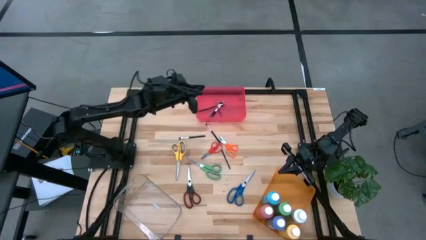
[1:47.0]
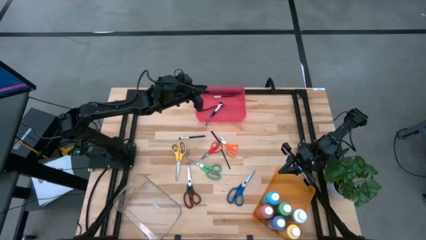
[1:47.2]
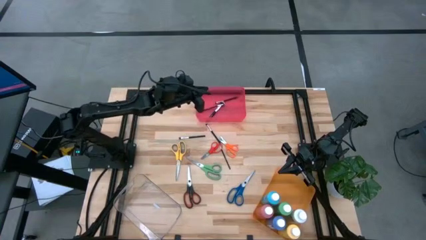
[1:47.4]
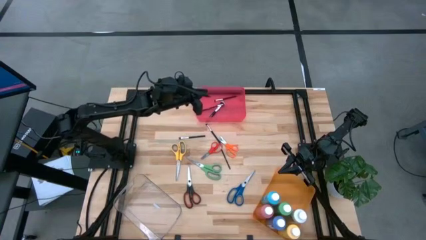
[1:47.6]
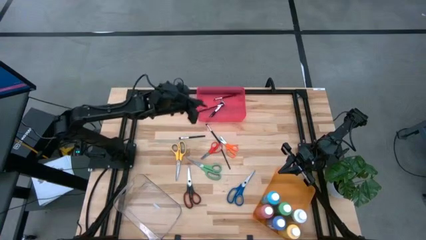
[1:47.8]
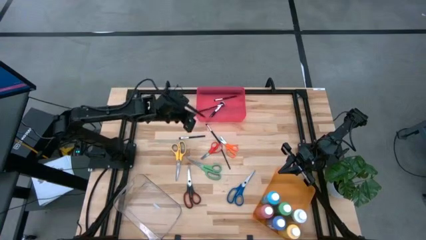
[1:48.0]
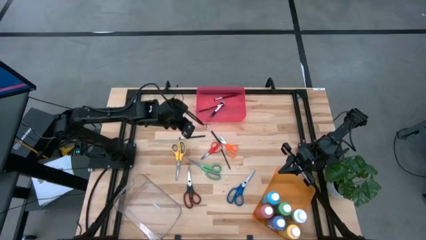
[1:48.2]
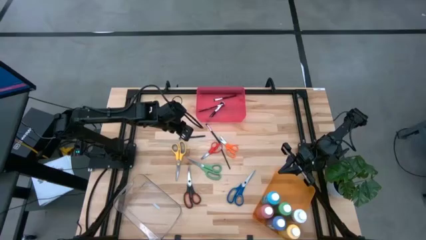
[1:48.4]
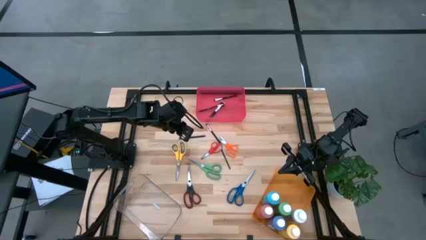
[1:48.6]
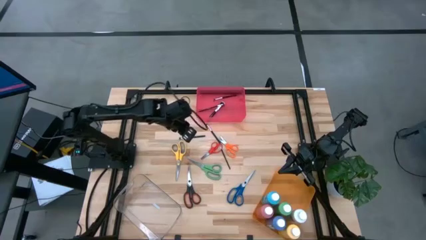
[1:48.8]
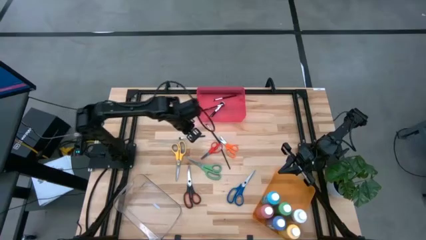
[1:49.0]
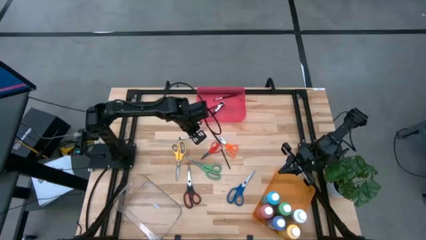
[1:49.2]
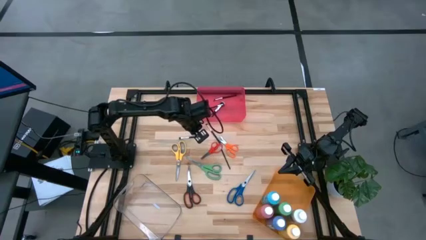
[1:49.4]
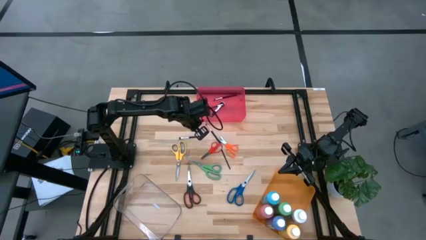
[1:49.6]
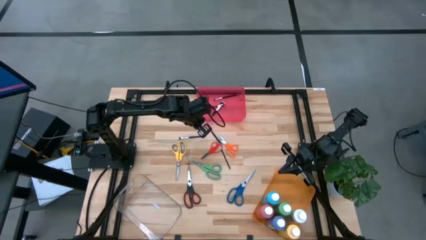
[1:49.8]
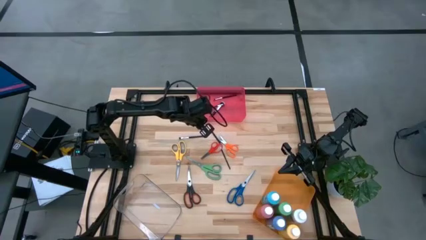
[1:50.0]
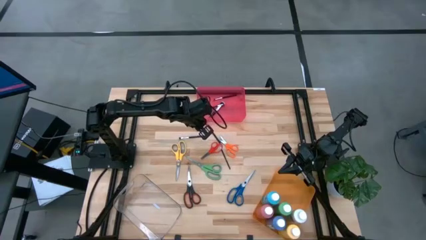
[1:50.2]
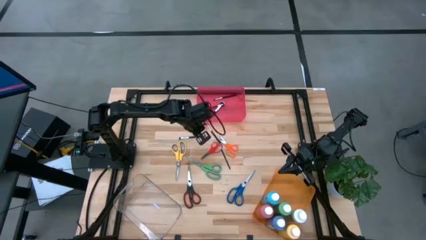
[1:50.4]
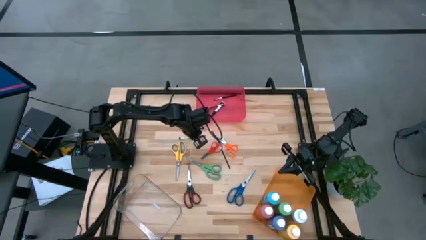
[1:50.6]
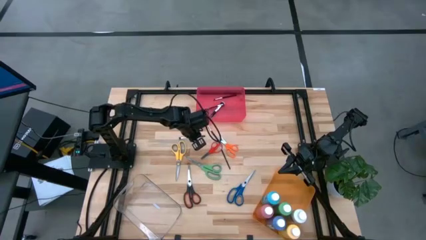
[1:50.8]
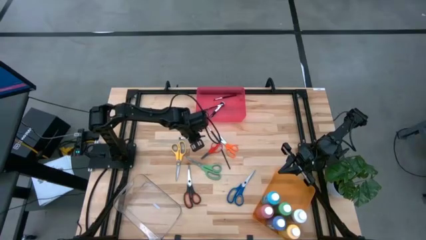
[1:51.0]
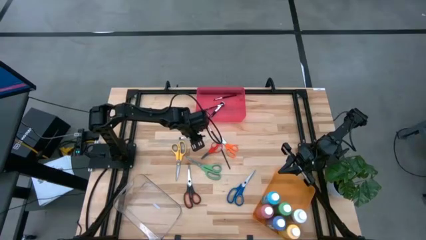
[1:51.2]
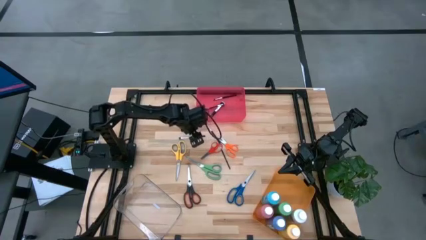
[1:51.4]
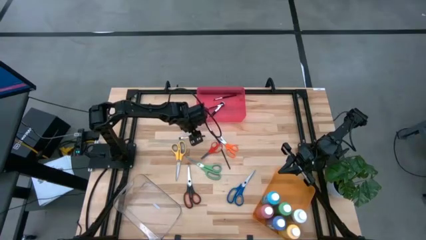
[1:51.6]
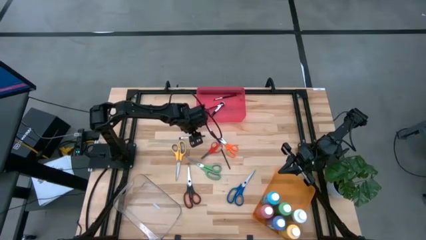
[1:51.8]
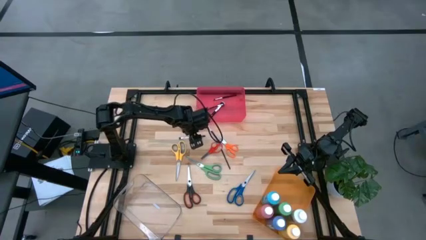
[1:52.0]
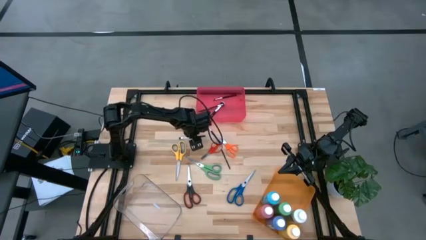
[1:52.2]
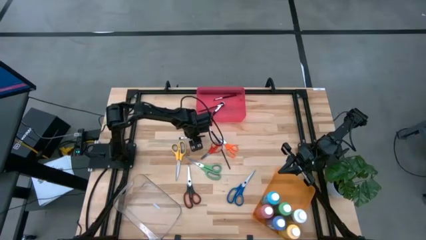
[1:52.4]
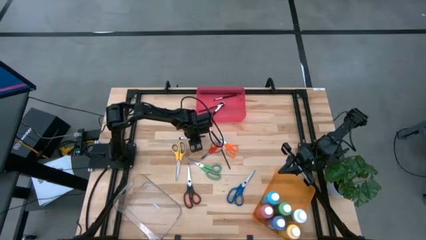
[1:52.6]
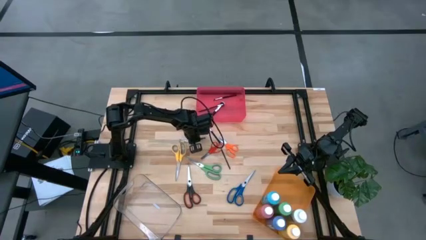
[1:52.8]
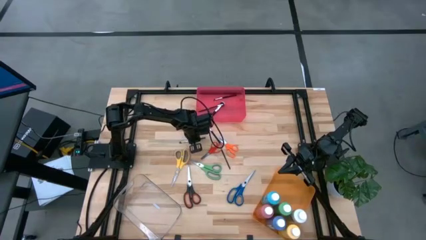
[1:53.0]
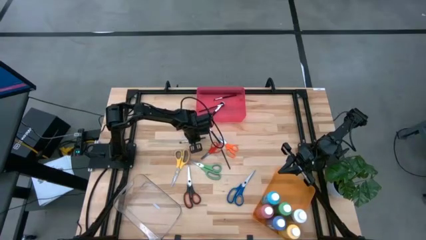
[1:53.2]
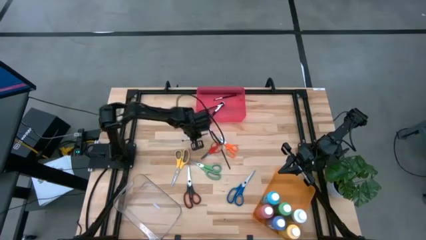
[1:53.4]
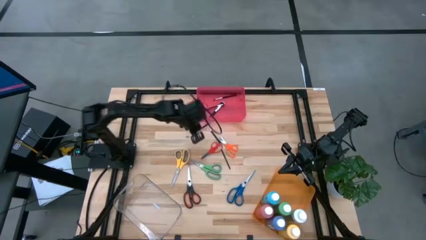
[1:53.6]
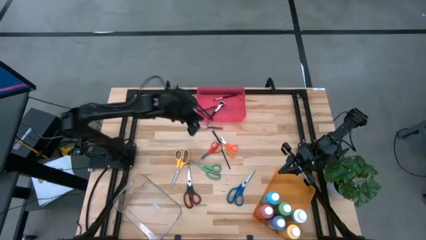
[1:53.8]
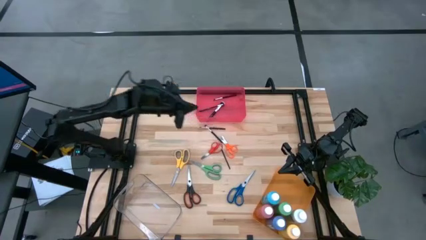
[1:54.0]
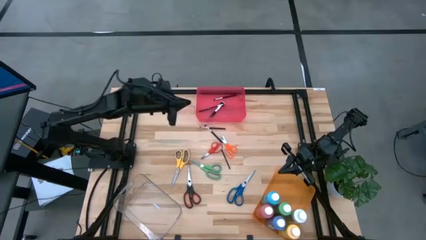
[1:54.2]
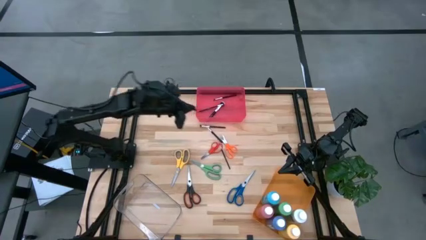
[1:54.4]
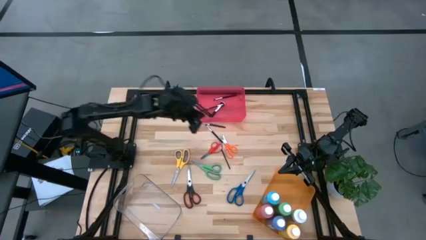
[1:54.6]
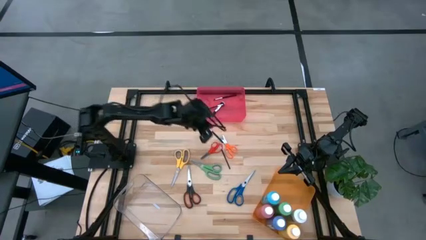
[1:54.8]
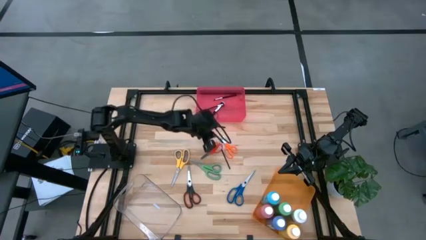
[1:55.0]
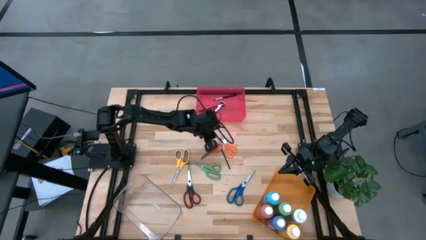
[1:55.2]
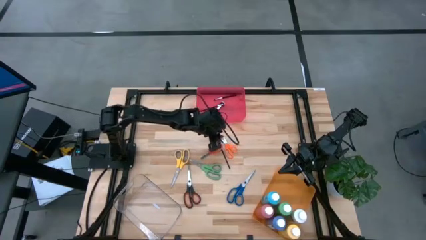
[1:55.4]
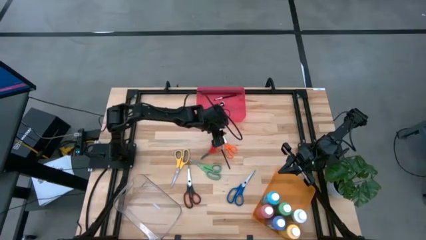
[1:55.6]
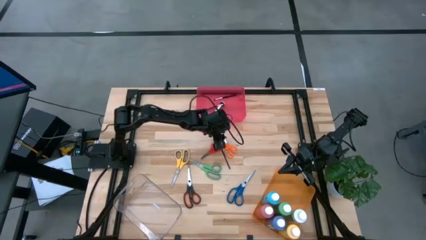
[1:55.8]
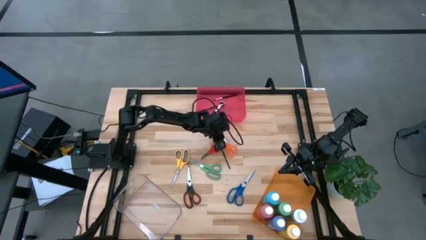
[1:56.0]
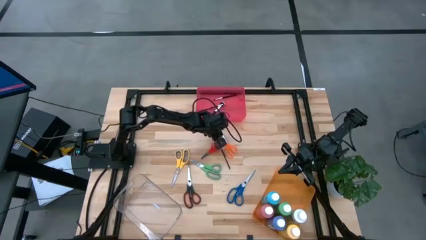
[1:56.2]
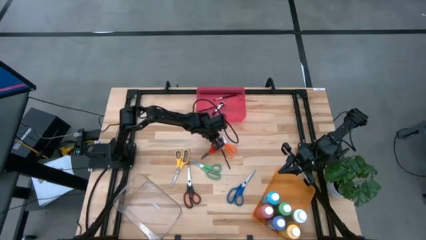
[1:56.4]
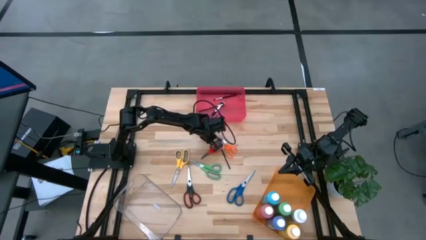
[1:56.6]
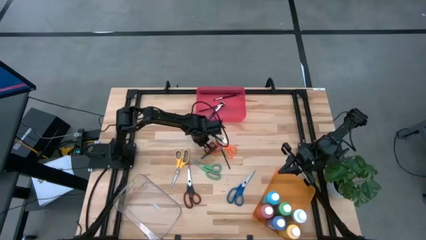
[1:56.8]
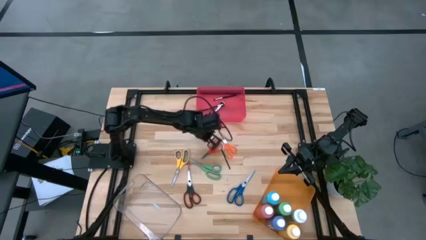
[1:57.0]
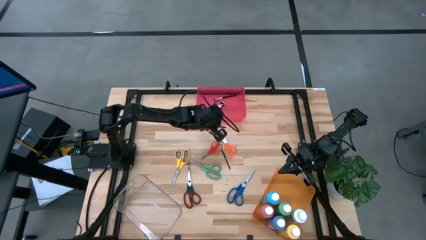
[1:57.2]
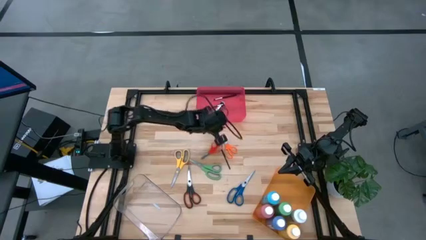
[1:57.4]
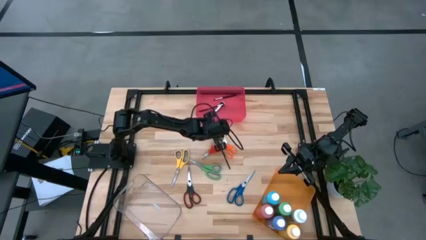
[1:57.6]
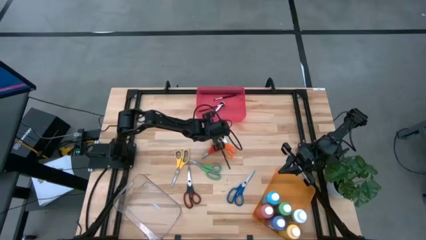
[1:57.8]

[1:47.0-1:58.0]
Task: Pick & Place Paint Supplies
Put the silver brush into the red bin

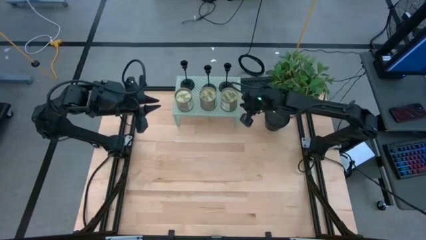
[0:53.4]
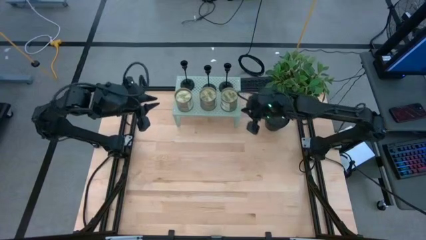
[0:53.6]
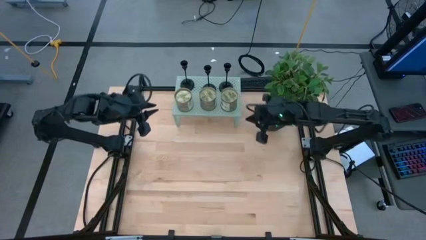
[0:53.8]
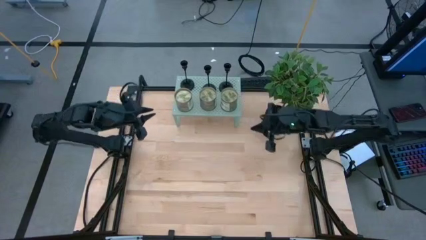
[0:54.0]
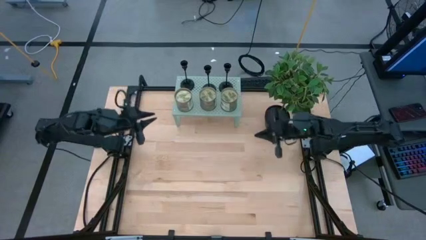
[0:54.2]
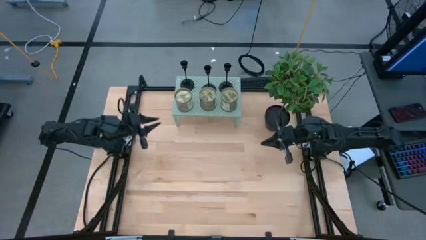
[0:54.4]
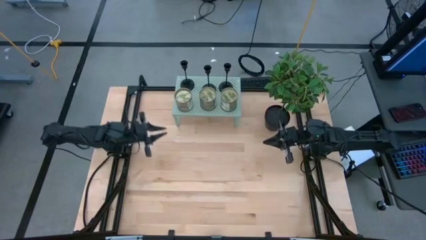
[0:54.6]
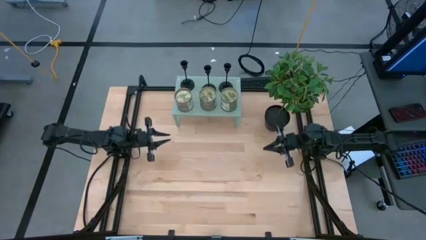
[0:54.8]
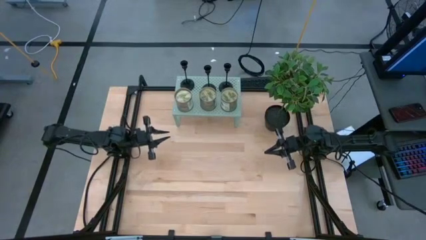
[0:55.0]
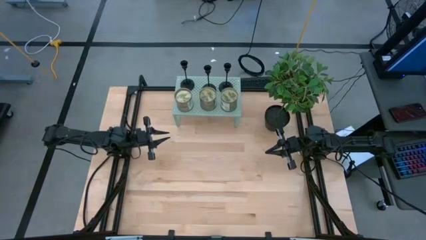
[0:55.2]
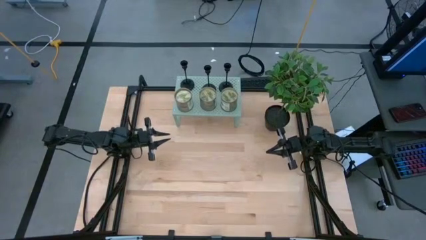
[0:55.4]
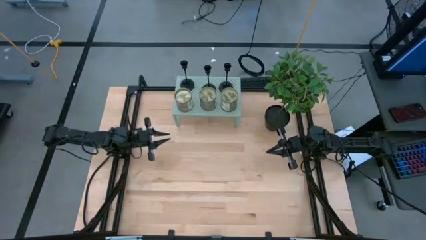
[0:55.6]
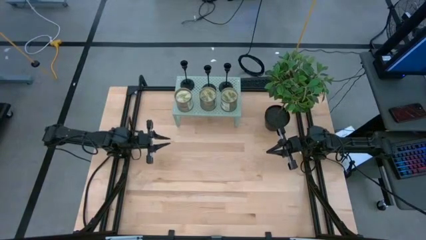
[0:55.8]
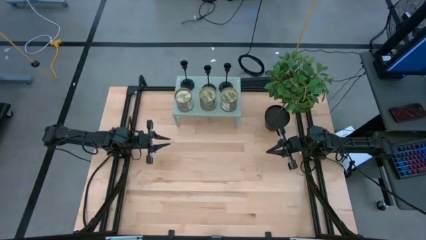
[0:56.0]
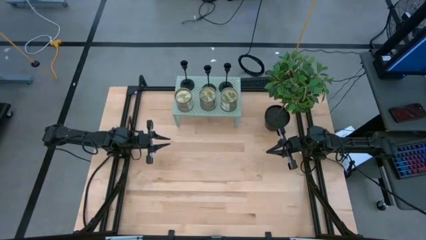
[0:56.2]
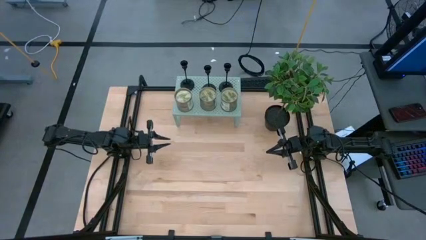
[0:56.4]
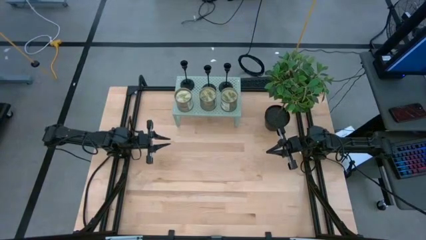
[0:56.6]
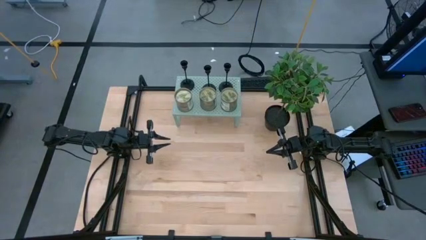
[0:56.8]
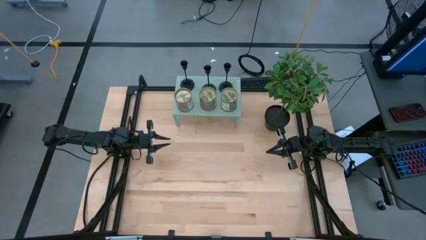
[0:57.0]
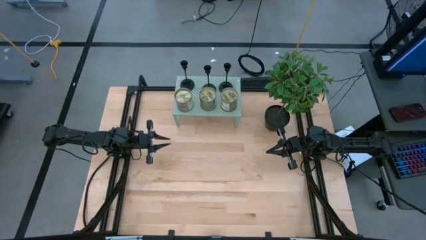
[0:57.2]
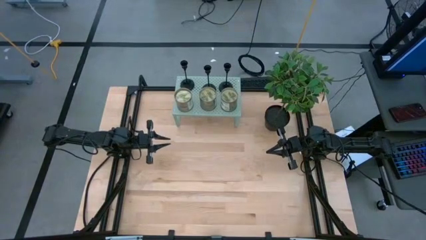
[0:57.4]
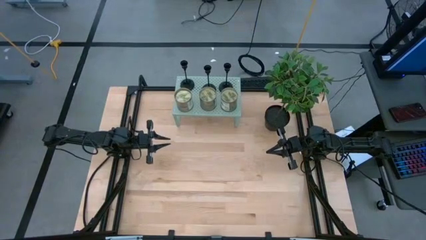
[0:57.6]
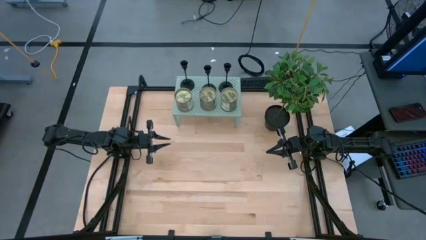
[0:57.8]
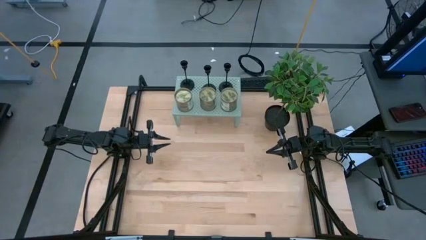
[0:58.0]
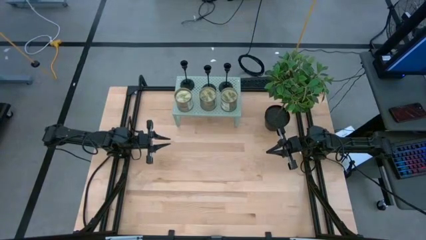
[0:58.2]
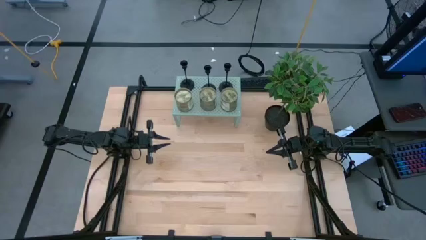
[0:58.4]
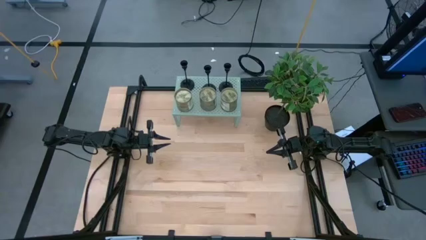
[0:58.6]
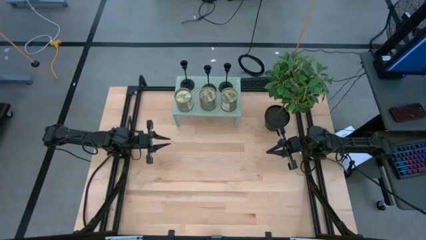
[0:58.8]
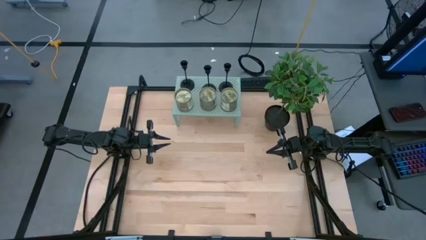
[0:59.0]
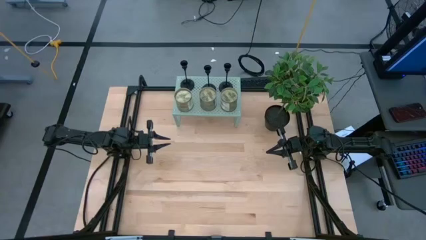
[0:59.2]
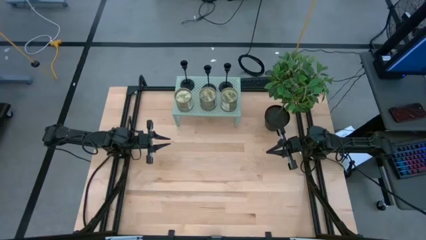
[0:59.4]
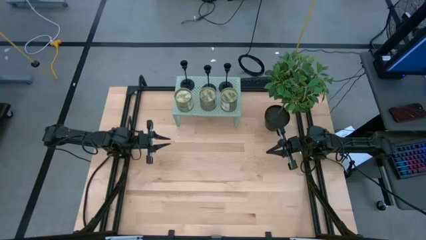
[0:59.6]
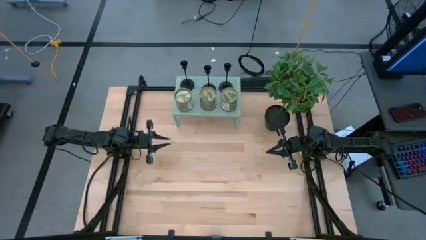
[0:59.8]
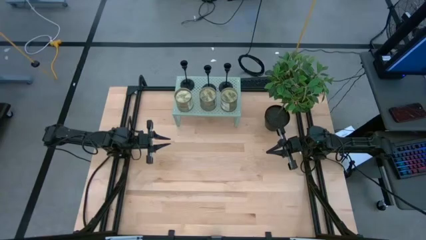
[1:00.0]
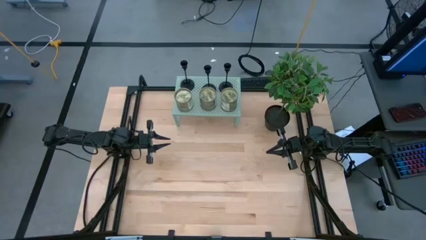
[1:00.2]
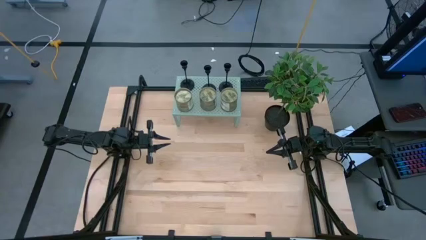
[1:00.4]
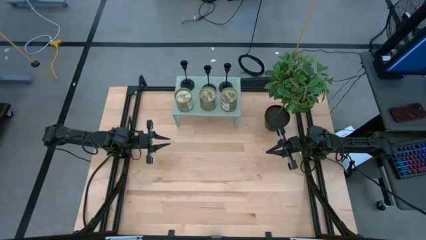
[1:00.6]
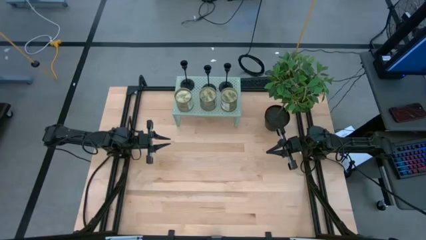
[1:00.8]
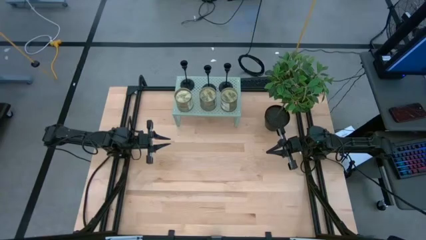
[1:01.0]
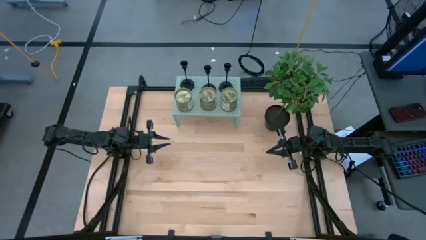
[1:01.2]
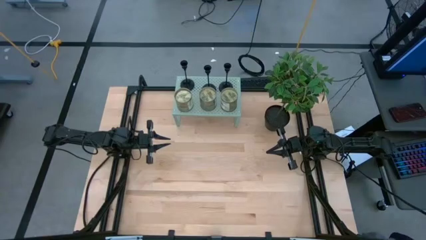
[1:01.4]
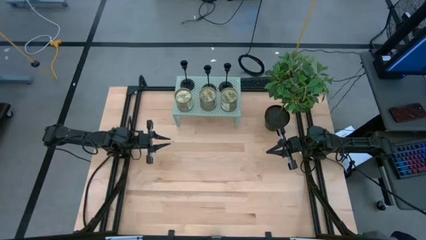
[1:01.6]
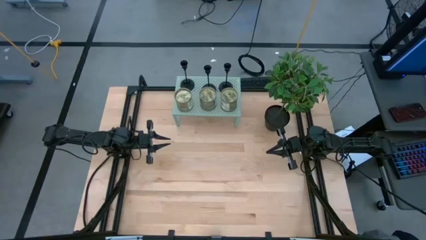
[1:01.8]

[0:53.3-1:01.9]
Task: Pick & Place candle stick holders
Return to Home Position
